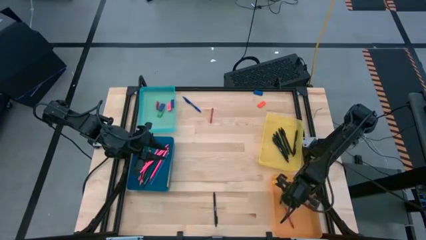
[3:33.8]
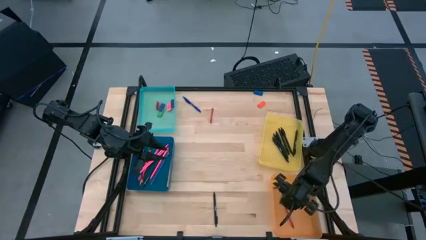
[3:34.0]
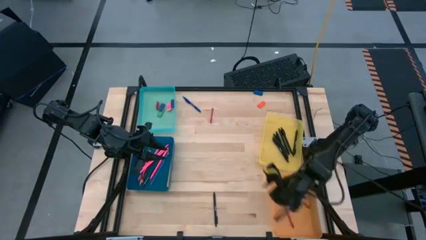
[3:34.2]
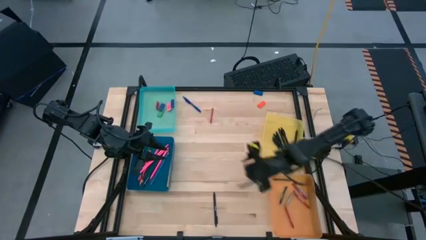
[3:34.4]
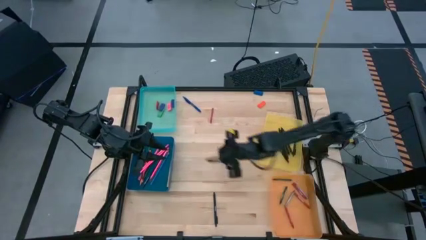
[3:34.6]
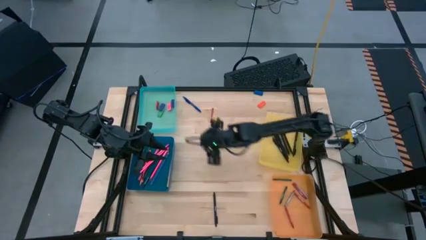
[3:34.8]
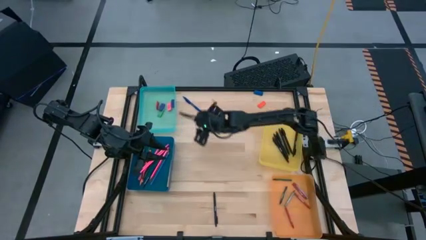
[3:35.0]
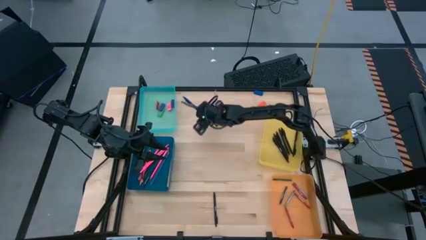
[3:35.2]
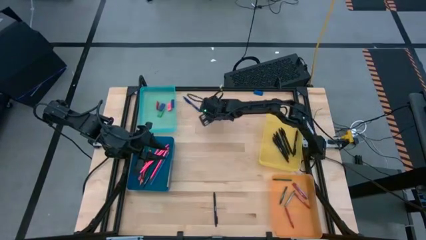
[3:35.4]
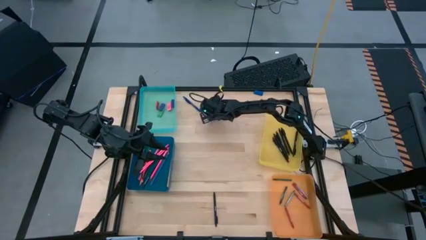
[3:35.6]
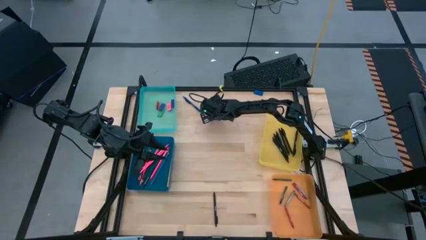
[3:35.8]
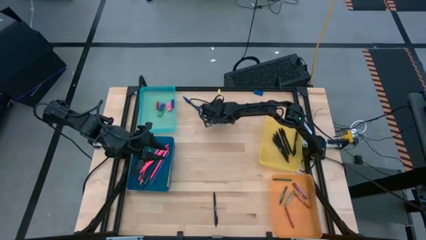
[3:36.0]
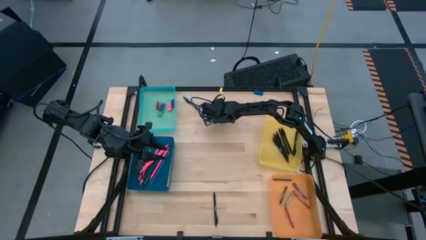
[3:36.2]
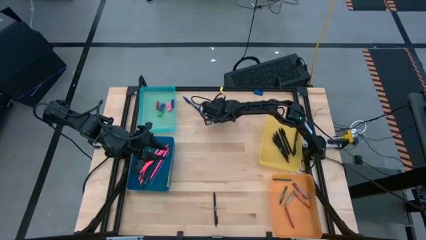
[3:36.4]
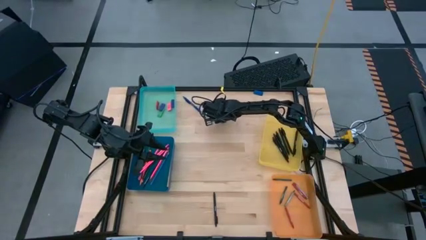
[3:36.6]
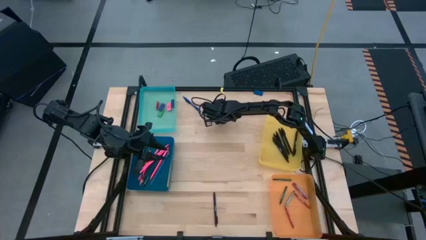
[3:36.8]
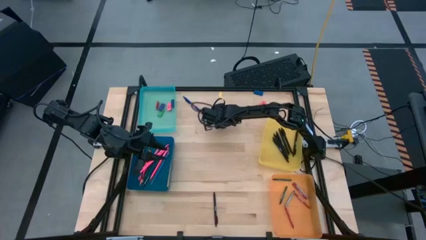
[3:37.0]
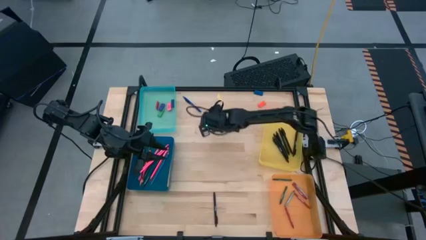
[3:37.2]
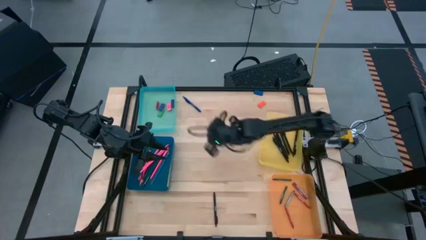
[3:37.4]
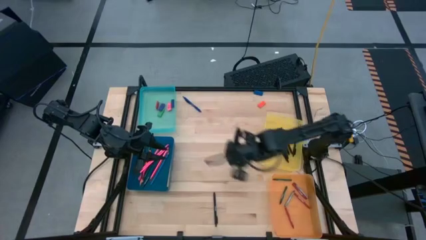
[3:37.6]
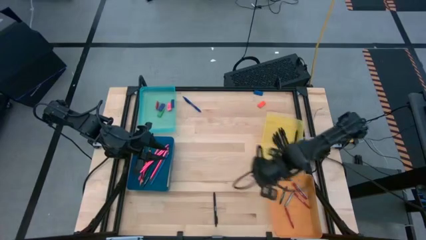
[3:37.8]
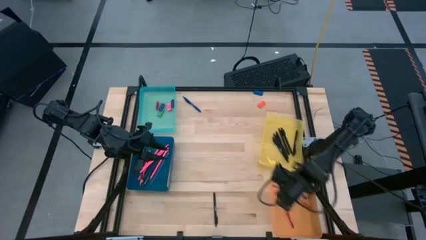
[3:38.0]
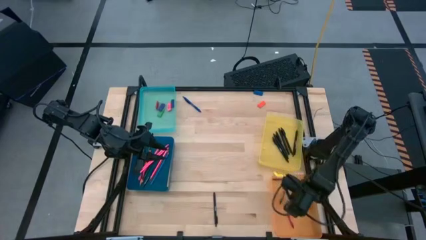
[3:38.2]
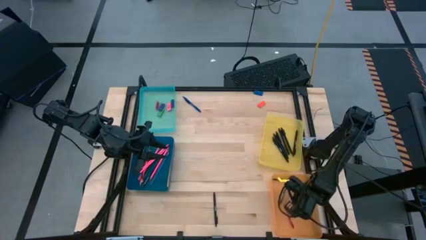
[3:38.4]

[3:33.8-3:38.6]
Task: Sort crayons/erasers/pens/pencils in bins
Put the red crayon into the orange bin

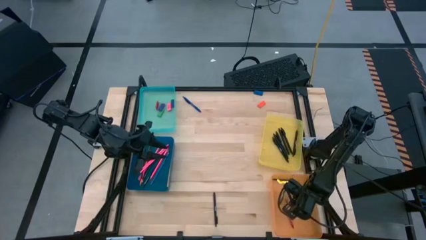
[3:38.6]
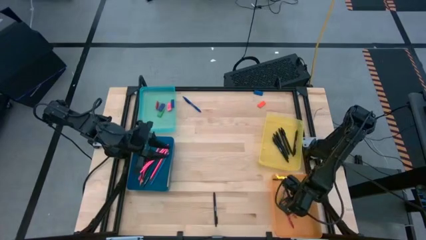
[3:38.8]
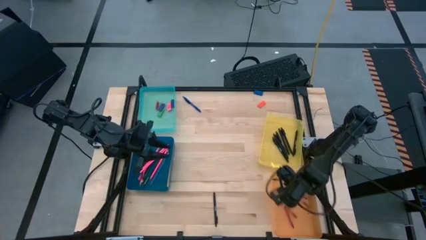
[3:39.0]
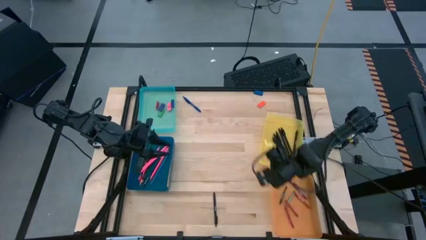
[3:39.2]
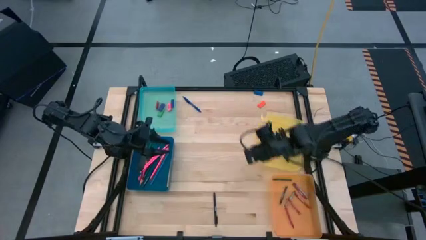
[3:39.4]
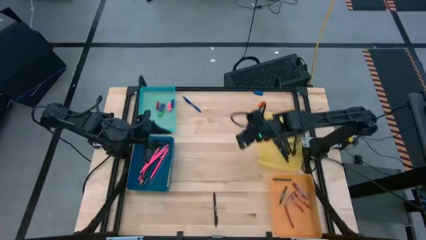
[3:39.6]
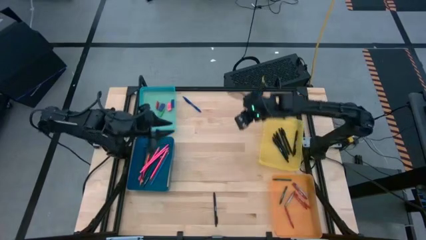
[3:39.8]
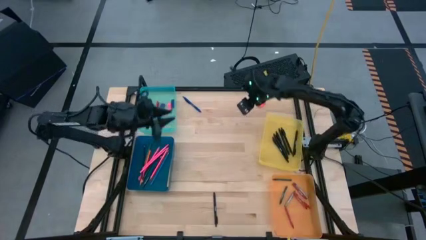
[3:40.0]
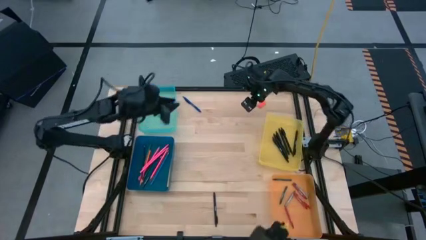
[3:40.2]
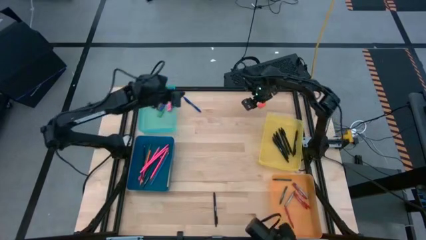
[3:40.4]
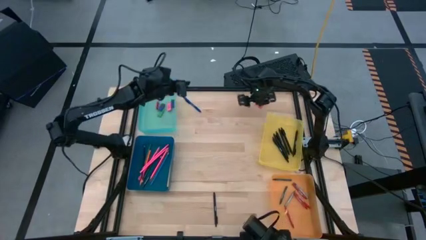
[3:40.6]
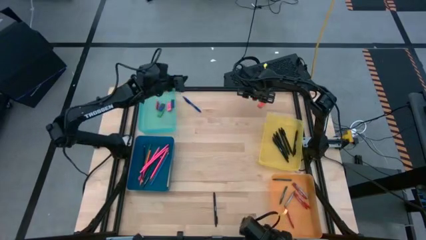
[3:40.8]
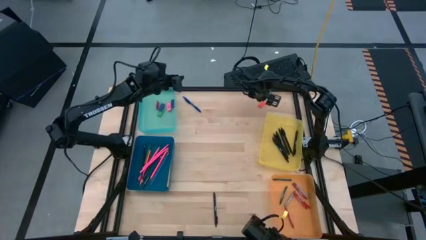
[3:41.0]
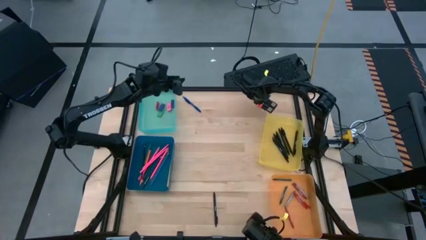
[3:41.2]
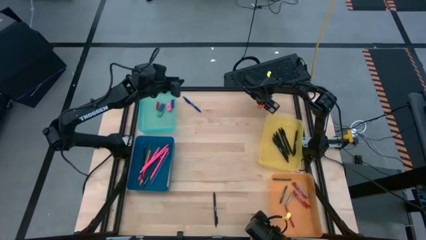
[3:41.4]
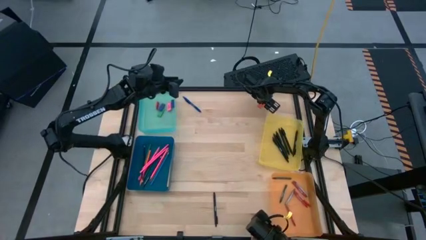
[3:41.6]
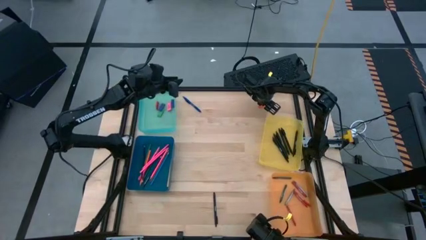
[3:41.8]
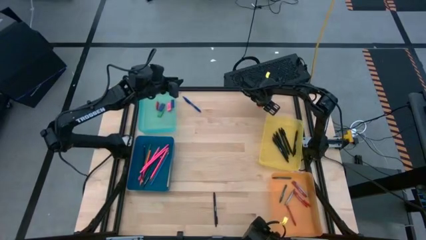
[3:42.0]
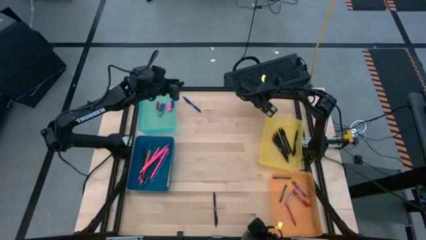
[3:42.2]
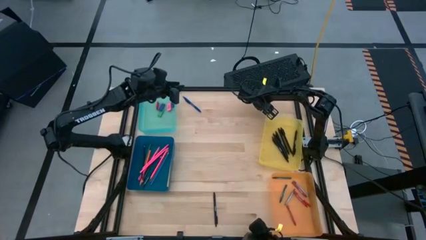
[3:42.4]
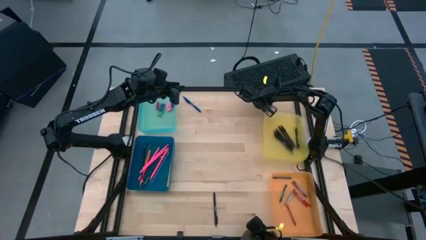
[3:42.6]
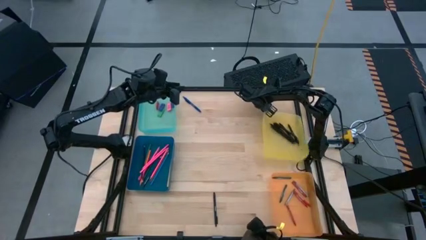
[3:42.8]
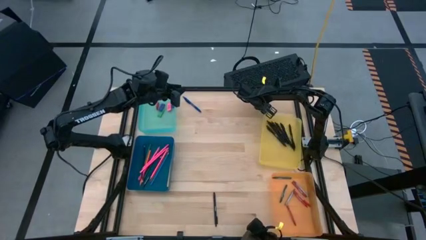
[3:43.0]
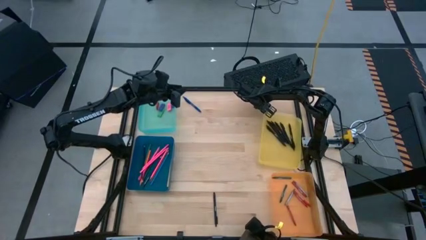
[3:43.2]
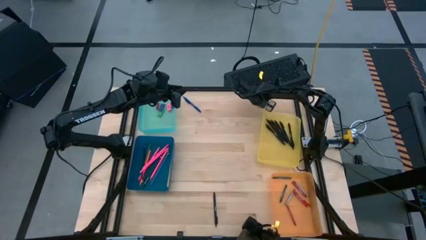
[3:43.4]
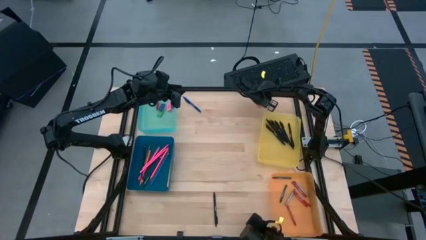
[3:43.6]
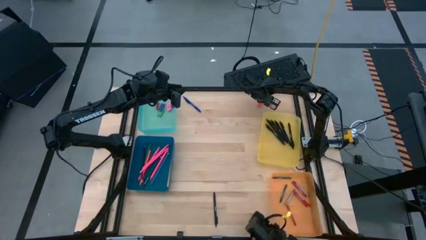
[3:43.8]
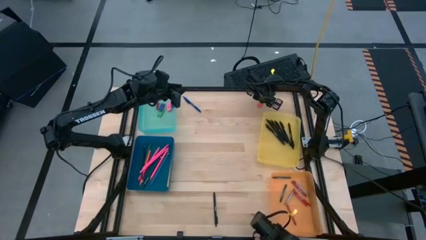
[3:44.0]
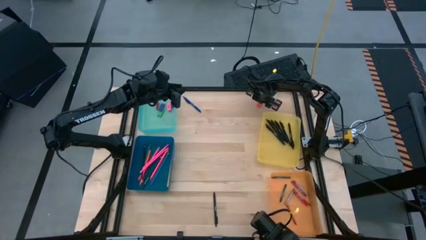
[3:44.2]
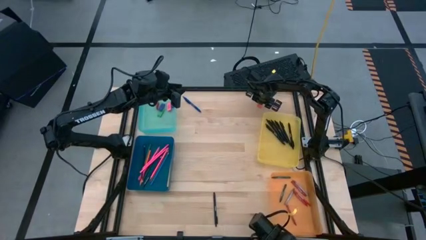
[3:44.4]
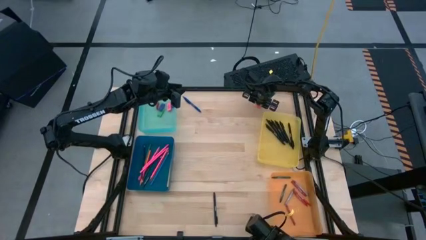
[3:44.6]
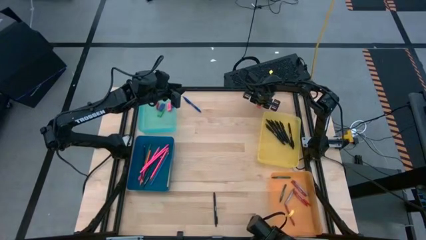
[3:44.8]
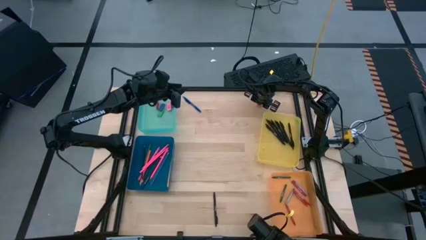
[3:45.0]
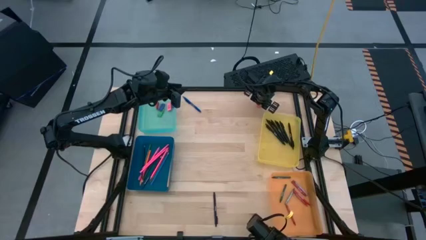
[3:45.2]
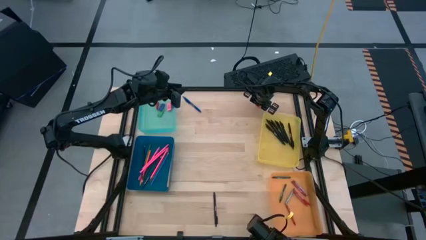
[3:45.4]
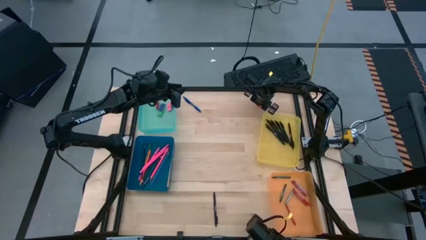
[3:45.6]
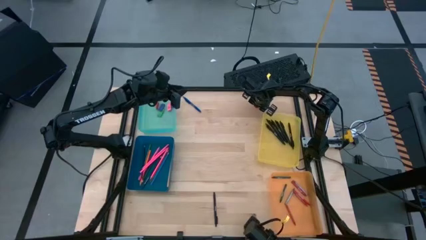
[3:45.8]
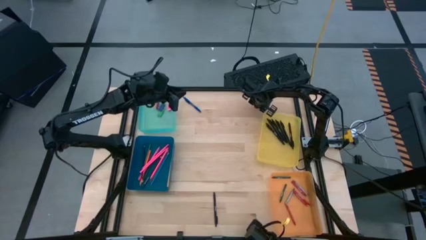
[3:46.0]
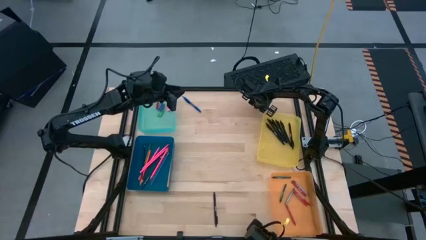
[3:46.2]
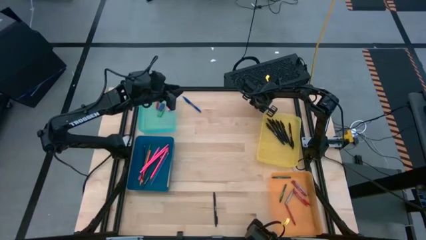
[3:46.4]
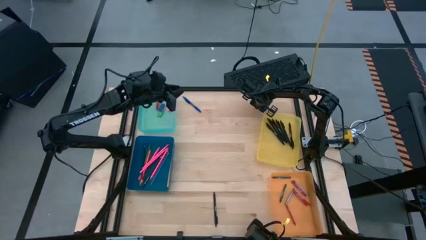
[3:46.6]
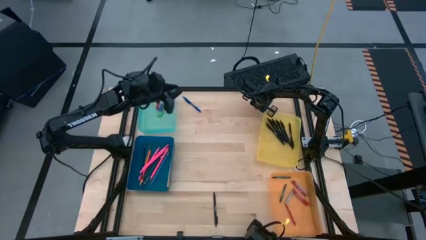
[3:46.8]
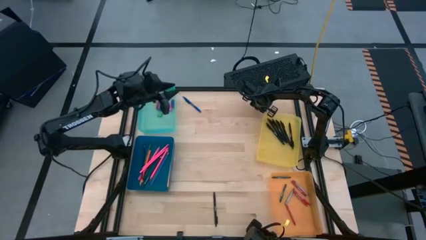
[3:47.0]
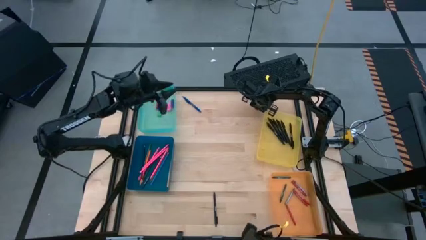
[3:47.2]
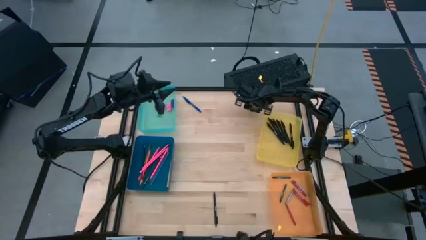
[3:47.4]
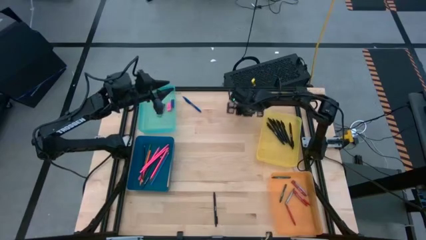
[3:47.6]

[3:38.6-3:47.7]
Put the orange eraser into the light blue bin

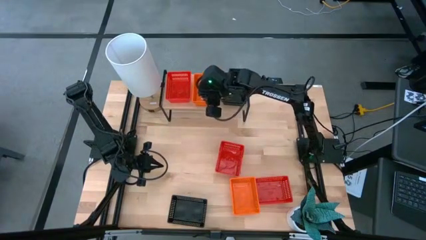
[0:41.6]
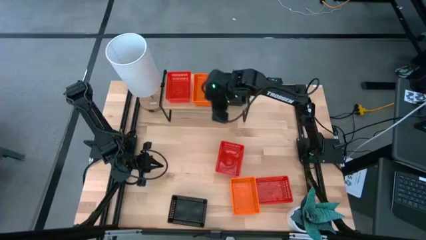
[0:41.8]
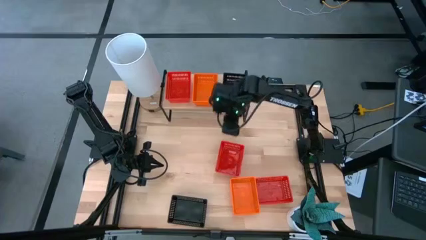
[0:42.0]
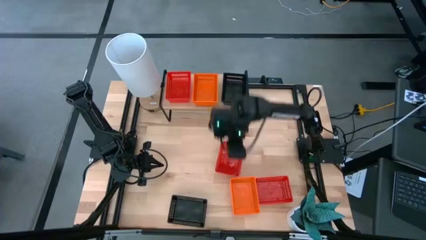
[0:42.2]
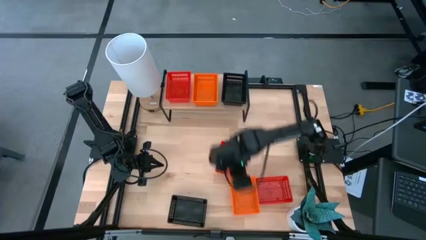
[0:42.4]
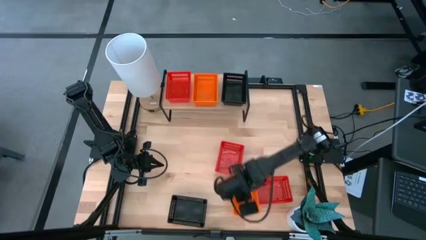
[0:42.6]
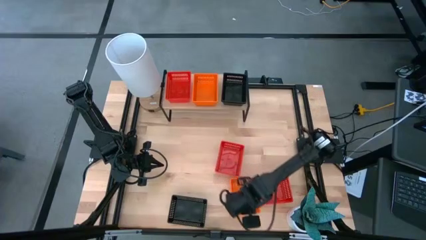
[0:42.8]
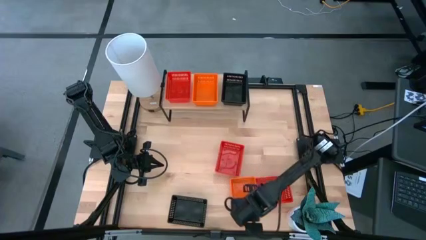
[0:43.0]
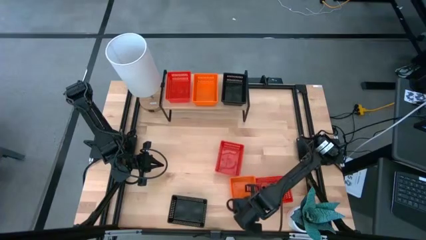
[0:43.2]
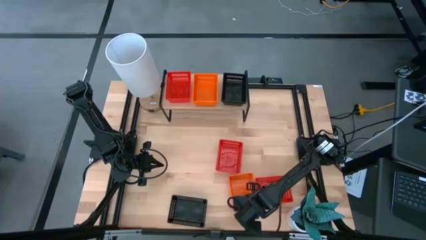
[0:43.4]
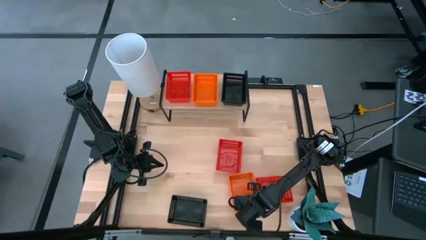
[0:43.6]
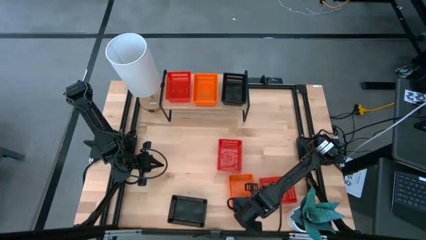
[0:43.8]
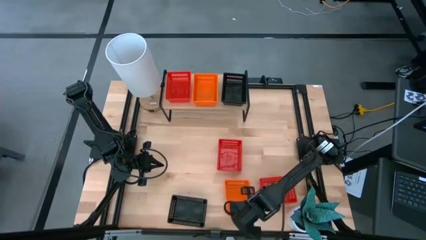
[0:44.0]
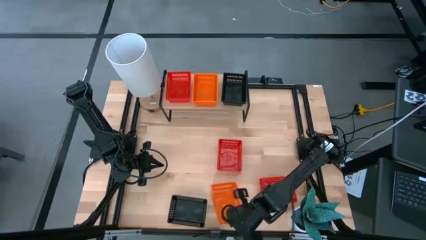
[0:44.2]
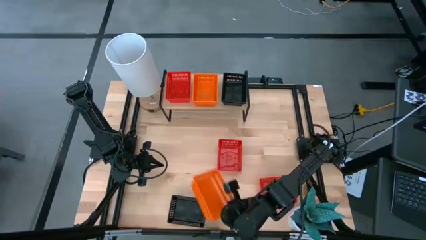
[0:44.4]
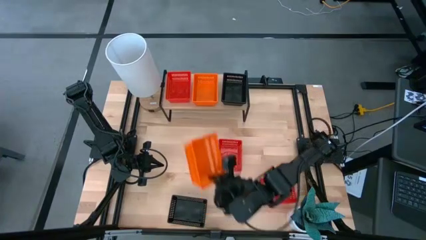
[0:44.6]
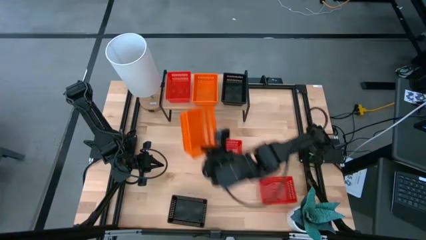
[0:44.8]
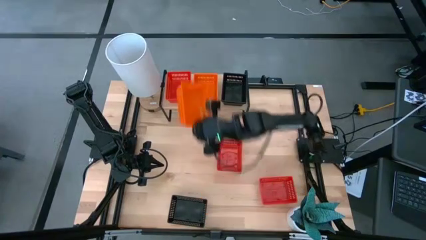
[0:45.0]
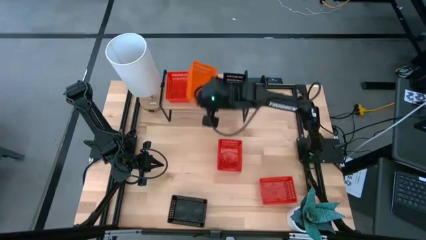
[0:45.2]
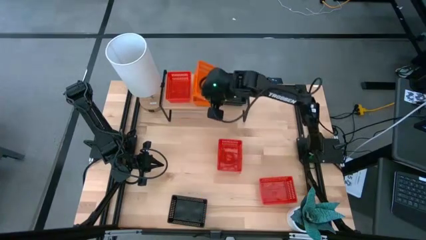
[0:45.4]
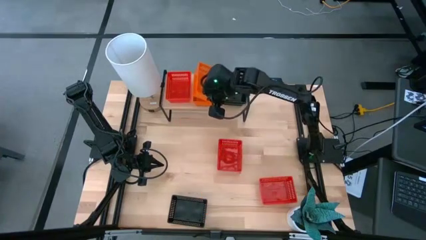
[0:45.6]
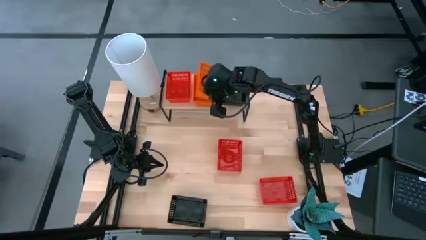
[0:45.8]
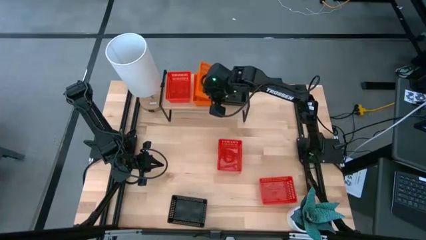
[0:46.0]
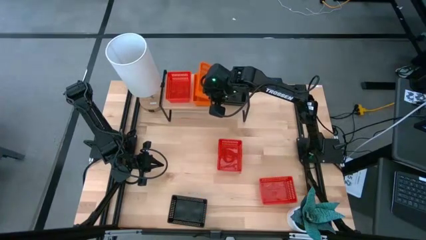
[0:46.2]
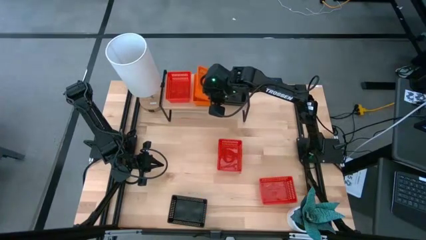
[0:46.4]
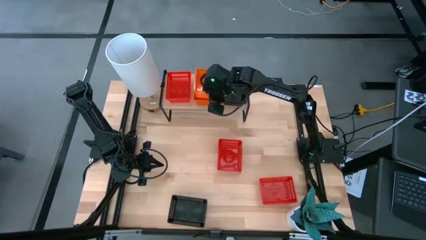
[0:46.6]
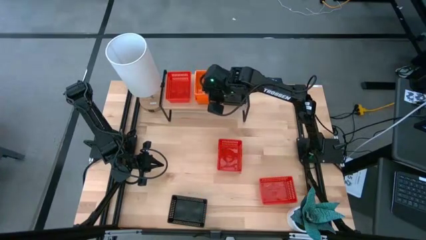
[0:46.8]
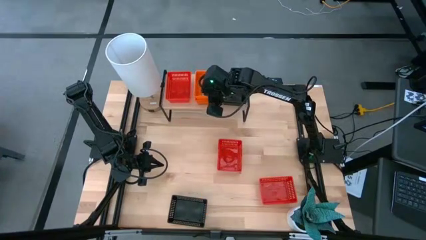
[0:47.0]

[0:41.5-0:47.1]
Task: Stack baskets on shelf by color
Stack the orange bin on the orange bin on the shelf
